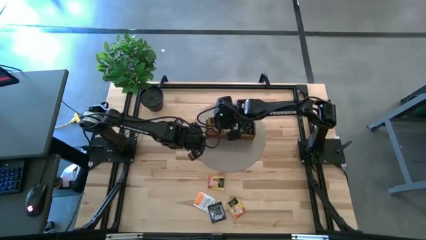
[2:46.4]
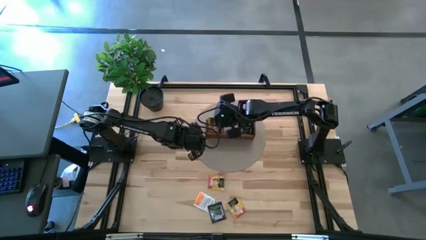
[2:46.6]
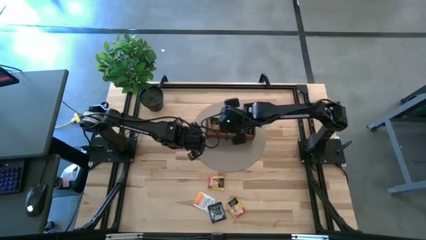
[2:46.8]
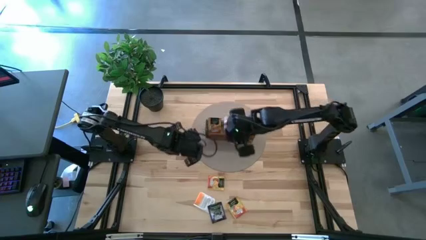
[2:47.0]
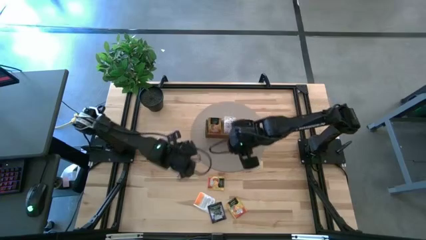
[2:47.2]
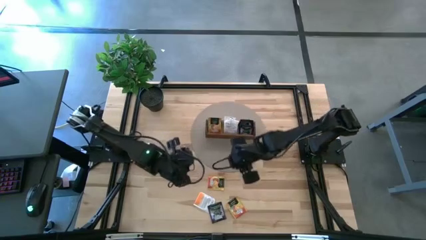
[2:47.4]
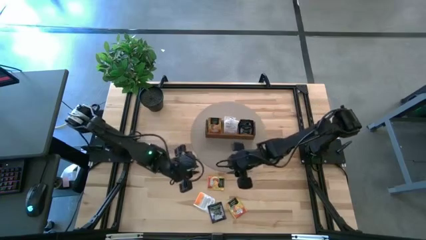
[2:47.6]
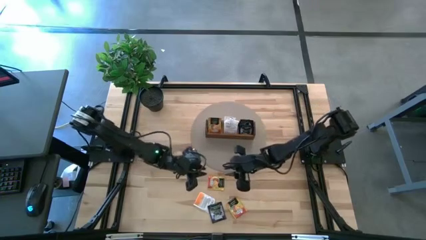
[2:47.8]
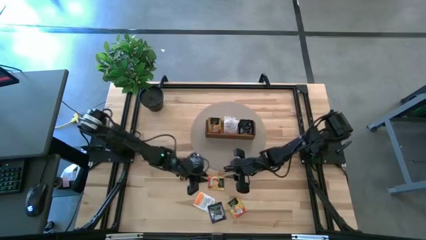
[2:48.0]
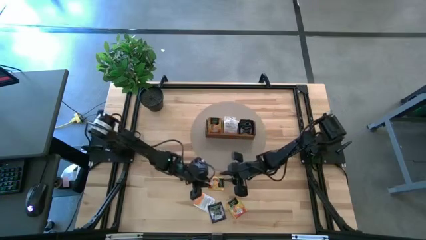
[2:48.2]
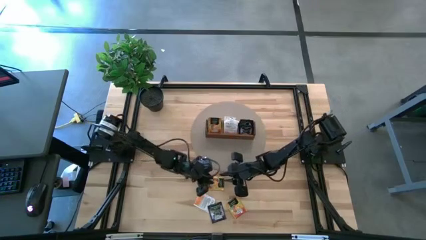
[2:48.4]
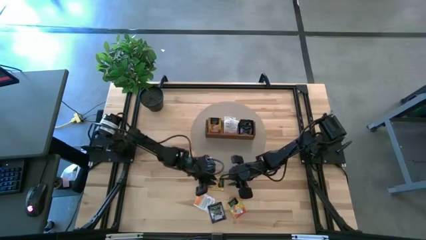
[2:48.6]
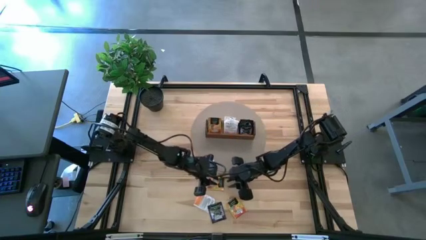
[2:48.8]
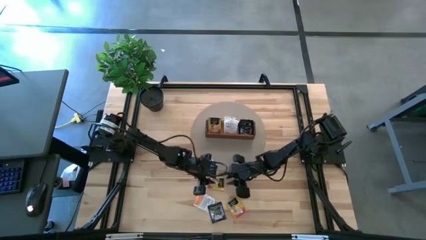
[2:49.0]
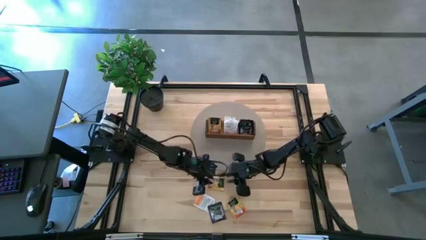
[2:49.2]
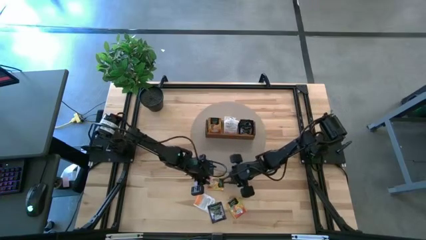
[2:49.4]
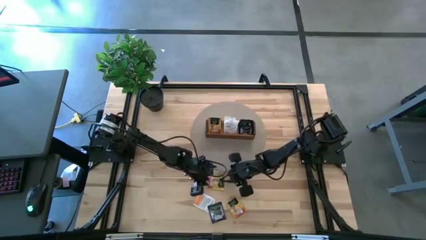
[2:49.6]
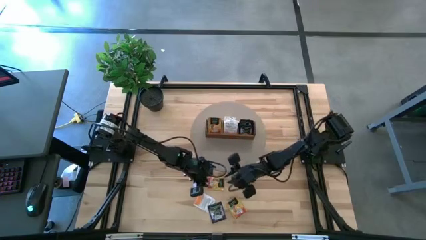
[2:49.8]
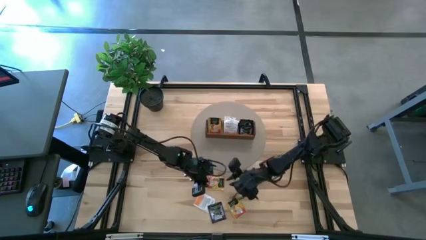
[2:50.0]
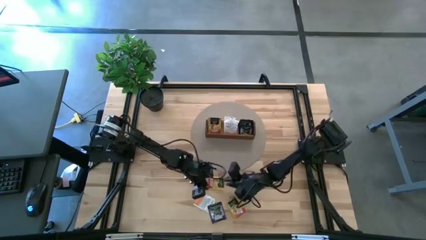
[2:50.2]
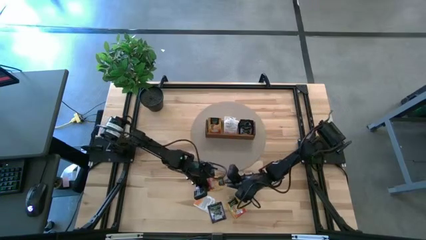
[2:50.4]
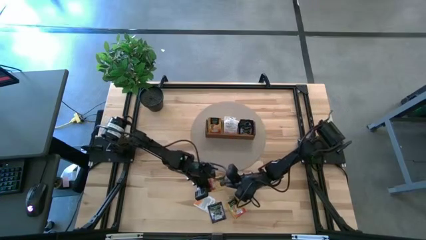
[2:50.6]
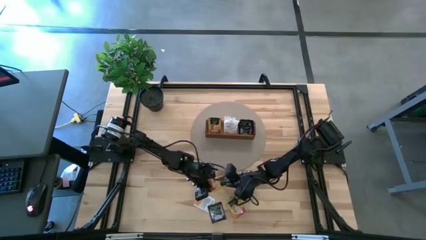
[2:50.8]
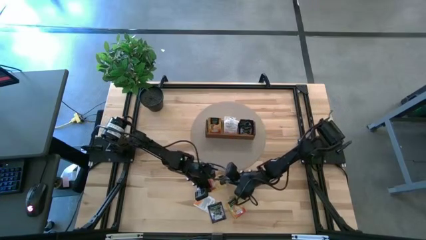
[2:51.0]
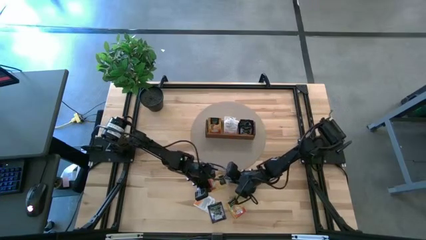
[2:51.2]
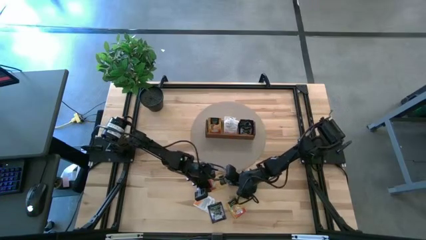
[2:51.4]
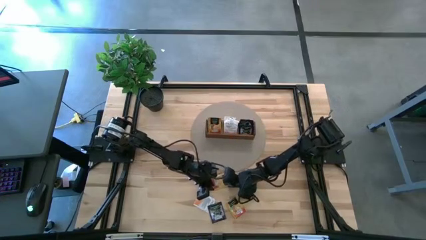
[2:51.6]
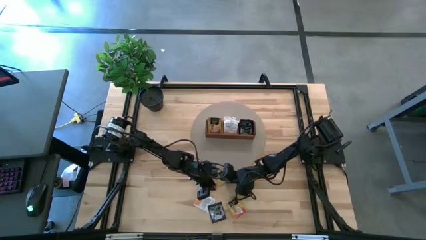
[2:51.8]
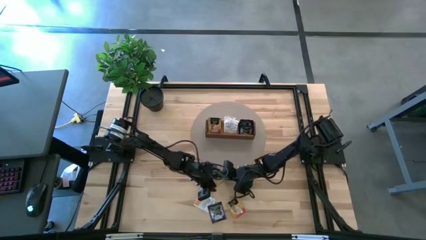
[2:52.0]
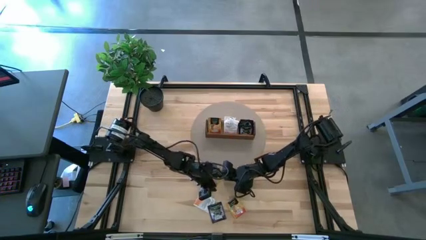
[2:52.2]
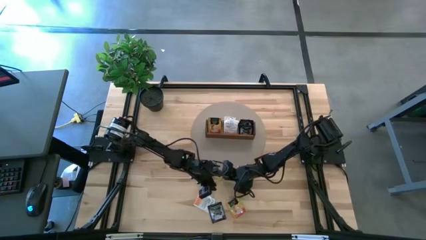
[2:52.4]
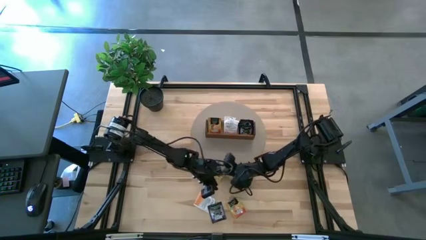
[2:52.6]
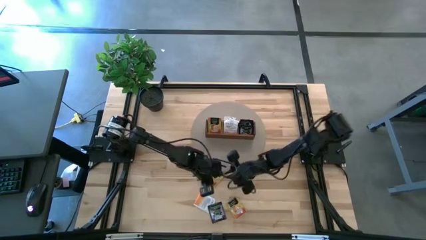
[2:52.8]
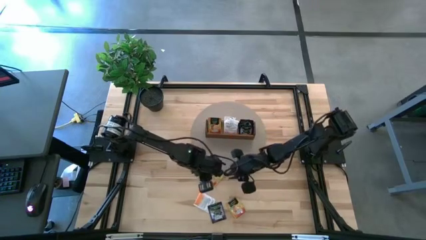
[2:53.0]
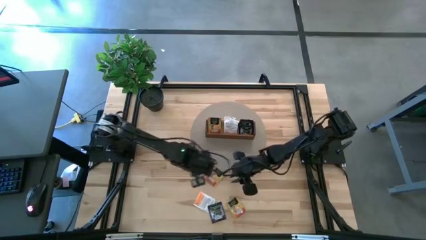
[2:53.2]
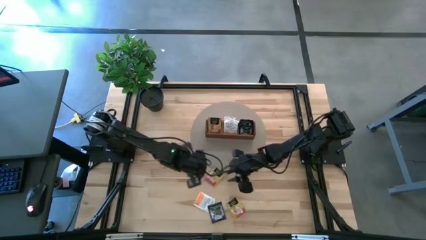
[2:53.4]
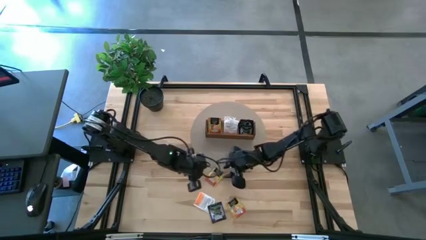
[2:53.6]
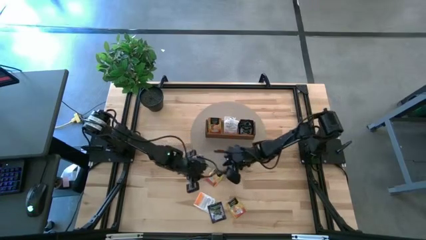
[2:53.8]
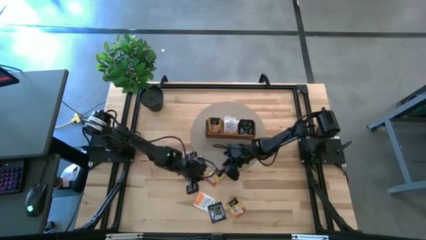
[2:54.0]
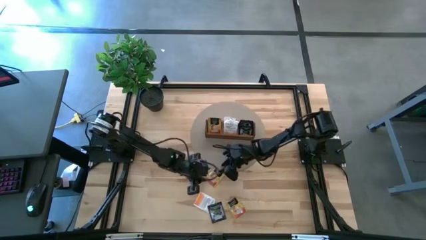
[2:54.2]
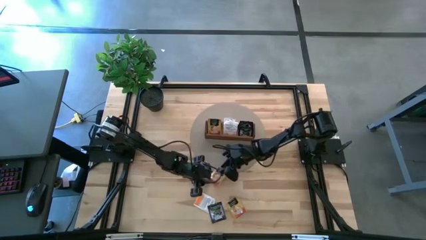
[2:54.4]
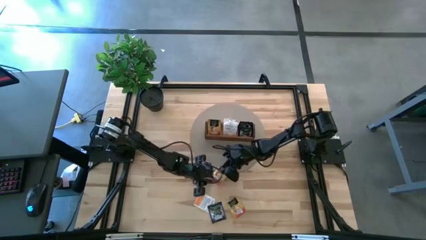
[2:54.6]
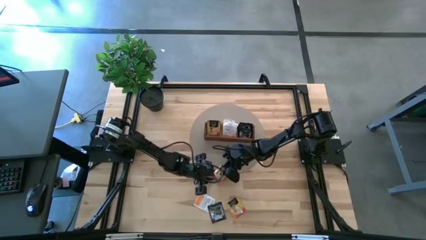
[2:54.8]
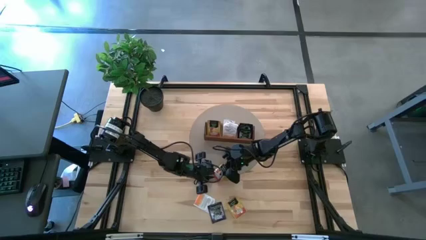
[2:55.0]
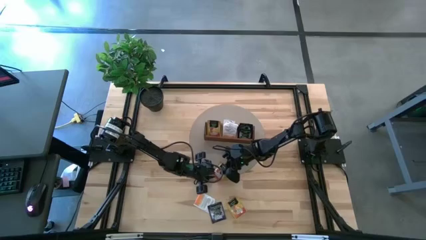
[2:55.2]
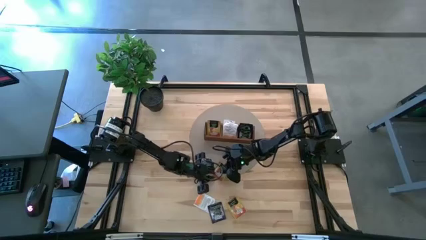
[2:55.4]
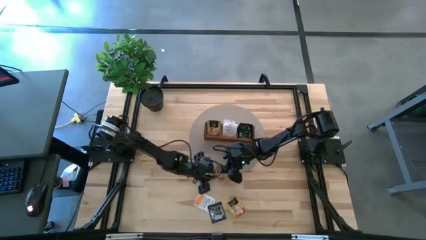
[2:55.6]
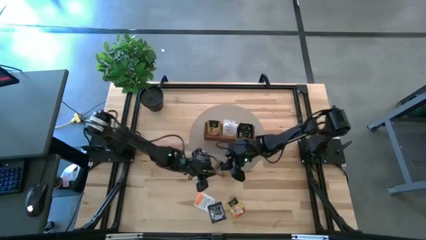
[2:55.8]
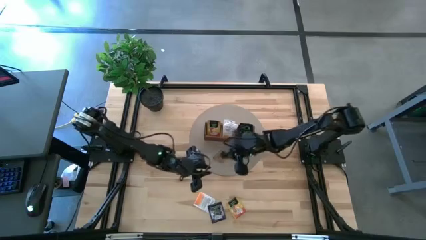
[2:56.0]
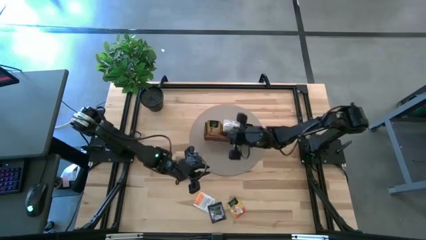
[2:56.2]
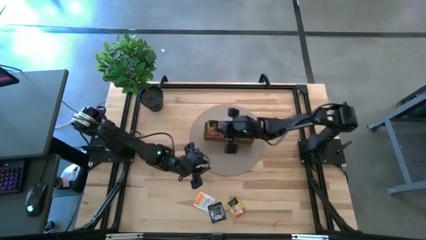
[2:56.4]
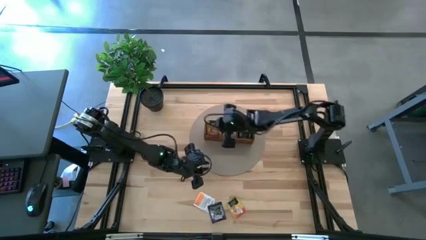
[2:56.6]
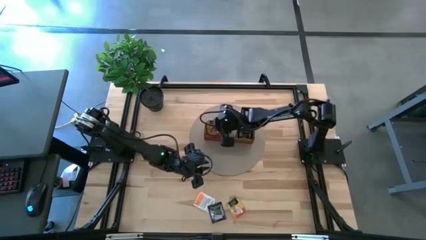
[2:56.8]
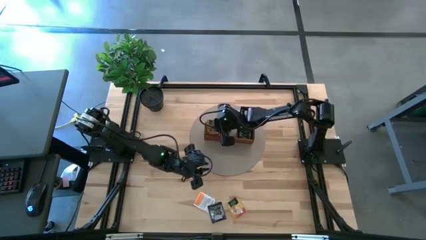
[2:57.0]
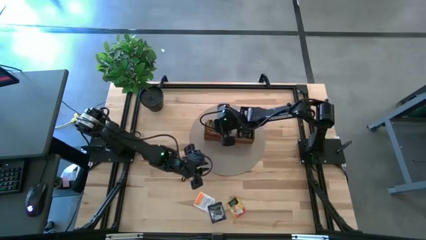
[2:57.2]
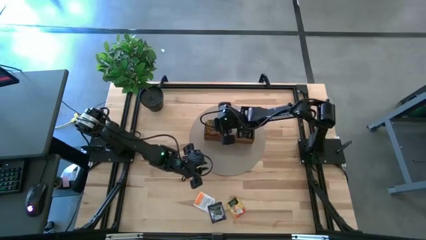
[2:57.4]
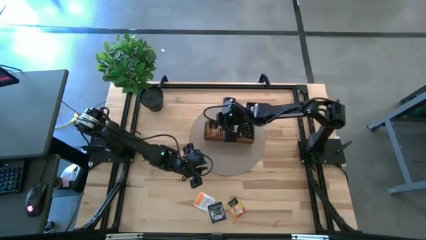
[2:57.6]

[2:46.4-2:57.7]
Task: Pick & Place Tea
Put the yellow tea bag into the left section of the wooden organizer

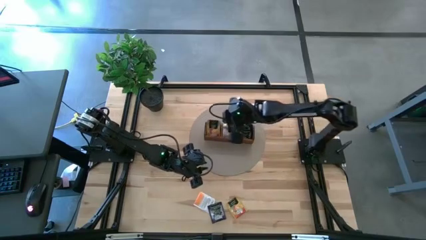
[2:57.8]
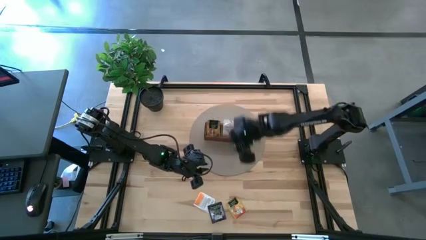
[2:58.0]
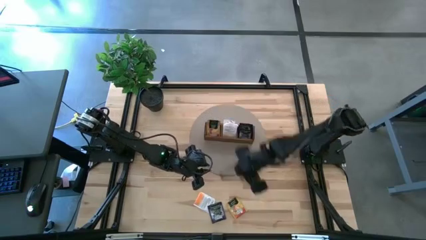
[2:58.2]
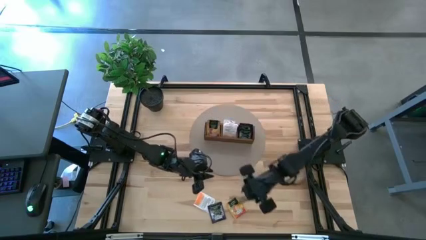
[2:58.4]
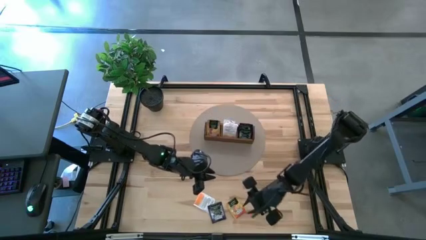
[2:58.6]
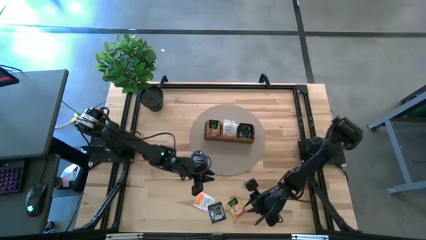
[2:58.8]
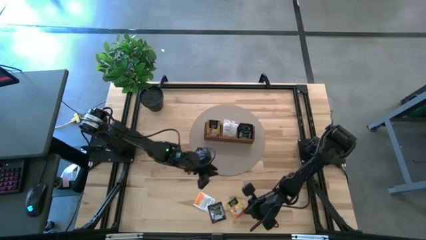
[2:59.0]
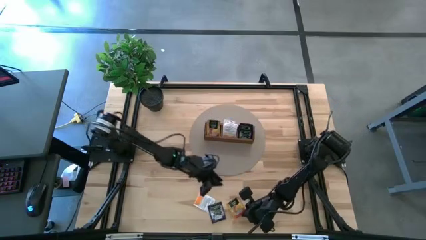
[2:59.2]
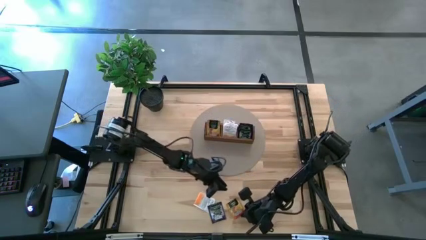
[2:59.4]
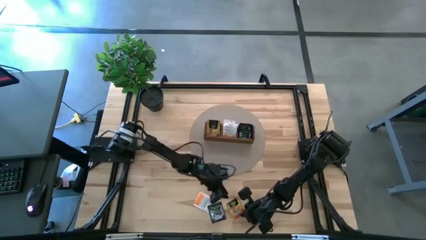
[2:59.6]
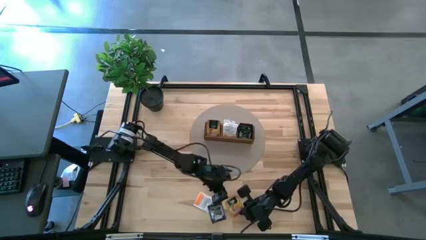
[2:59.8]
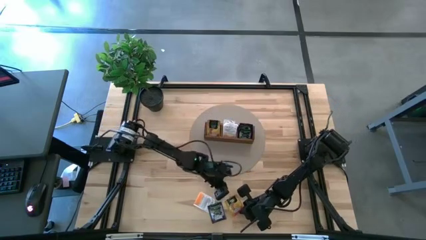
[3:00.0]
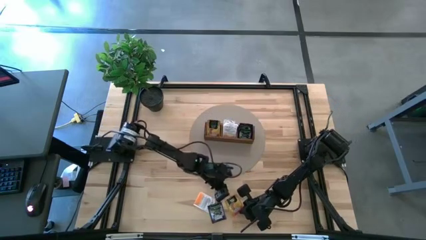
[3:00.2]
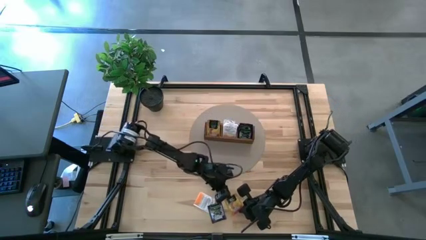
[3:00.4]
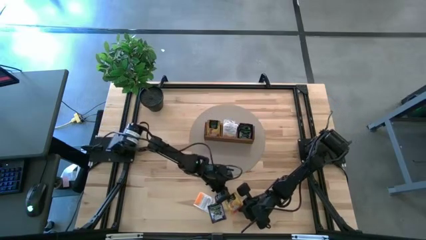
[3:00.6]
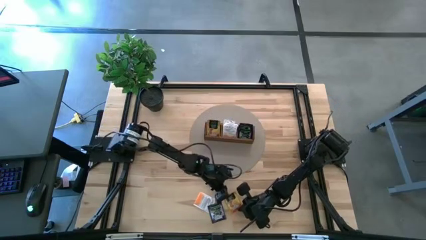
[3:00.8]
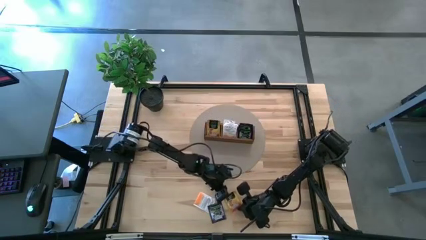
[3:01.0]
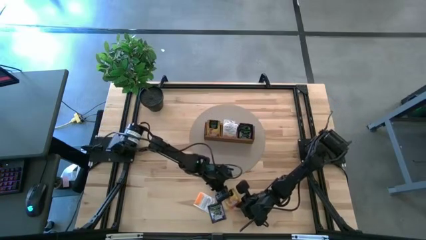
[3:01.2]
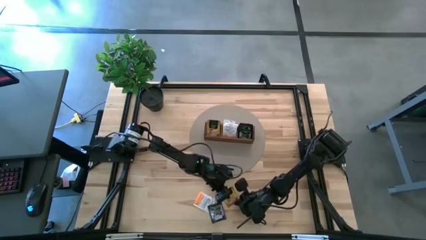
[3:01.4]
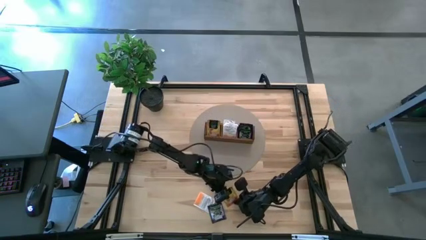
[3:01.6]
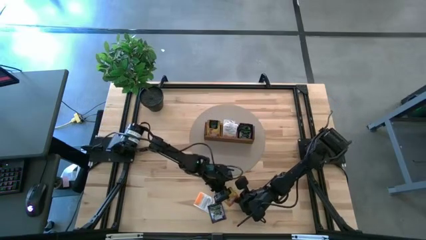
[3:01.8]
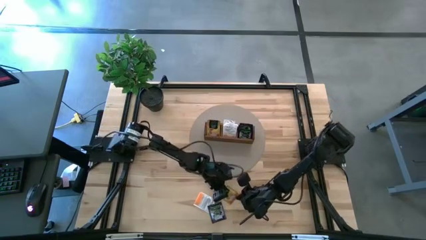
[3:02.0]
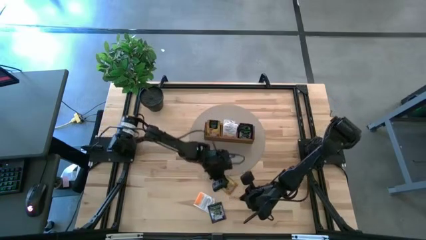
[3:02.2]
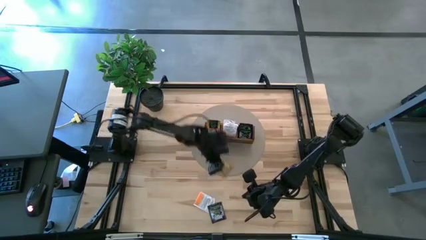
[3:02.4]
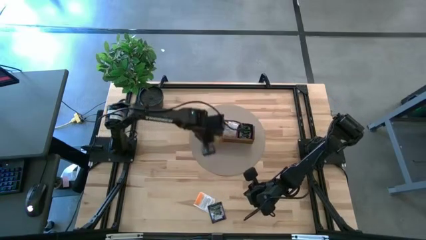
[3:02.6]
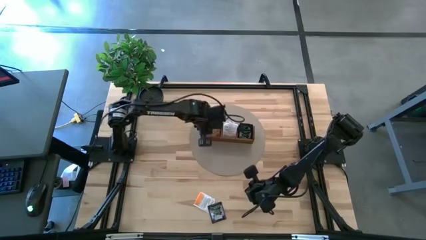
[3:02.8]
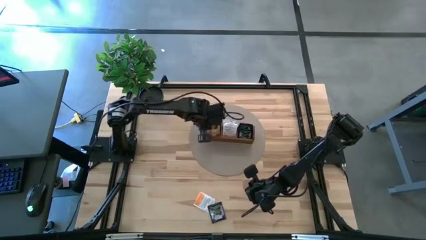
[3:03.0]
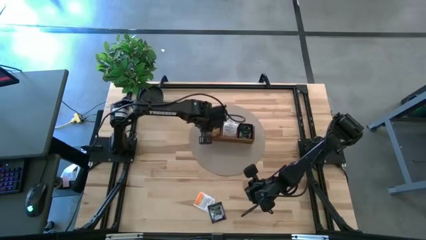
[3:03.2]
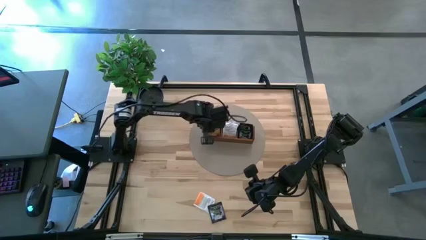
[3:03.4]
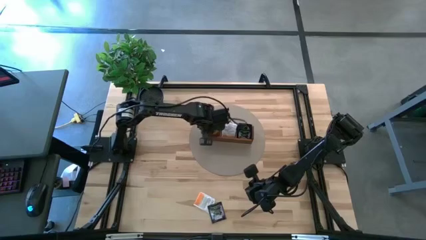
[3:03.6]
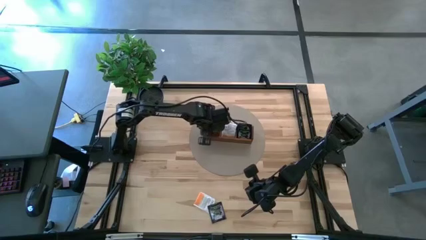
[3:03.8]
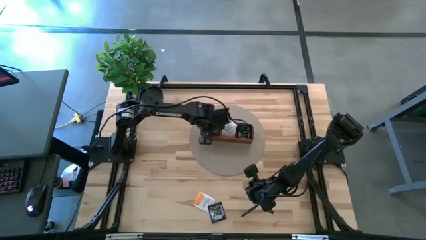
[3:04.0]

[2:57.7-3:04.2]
Put the yellow tea bag into the left section of the wooden organizer
